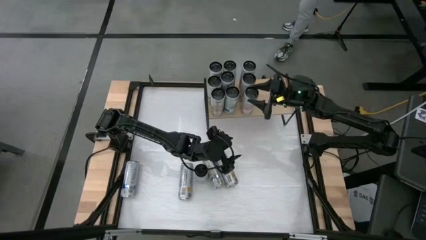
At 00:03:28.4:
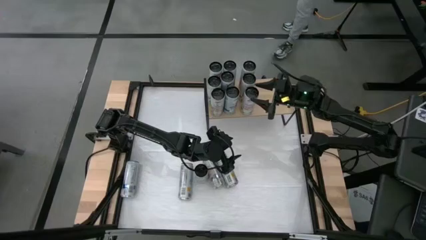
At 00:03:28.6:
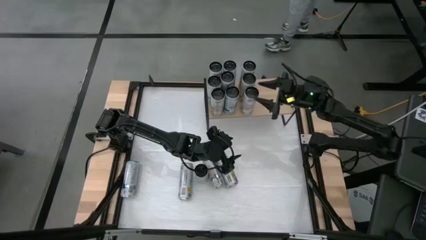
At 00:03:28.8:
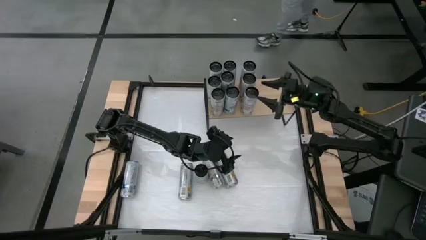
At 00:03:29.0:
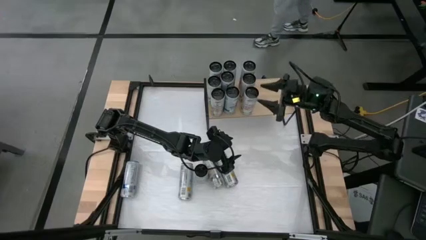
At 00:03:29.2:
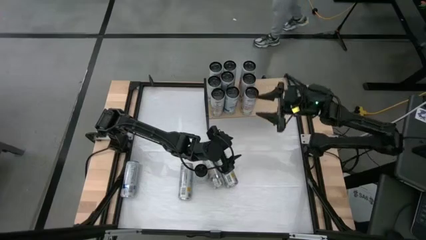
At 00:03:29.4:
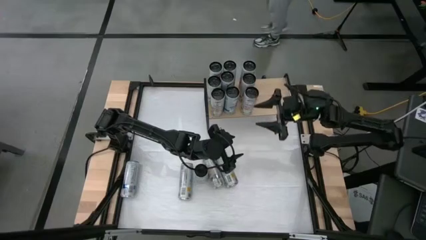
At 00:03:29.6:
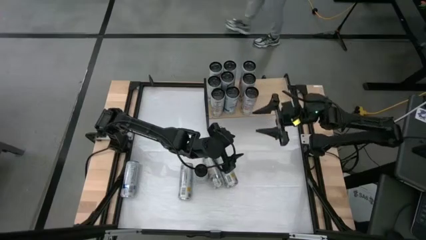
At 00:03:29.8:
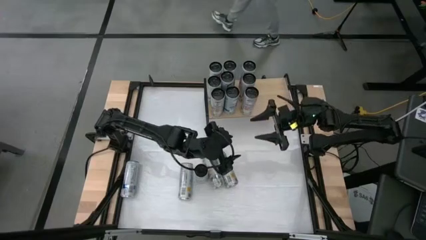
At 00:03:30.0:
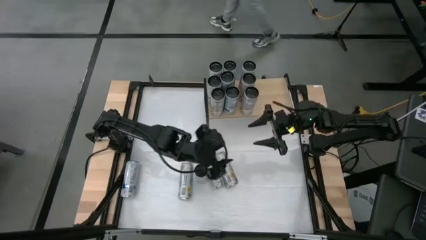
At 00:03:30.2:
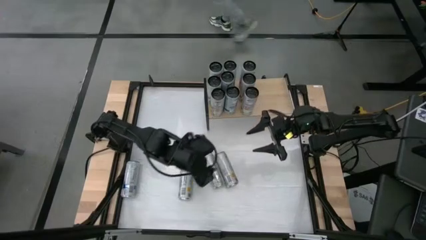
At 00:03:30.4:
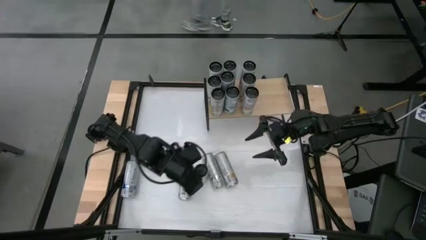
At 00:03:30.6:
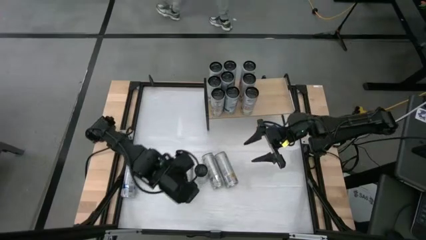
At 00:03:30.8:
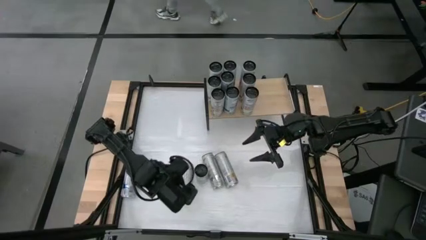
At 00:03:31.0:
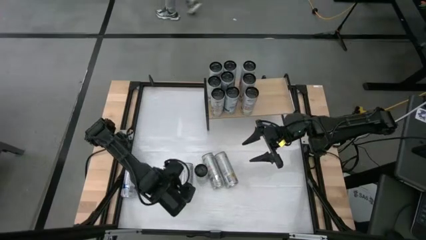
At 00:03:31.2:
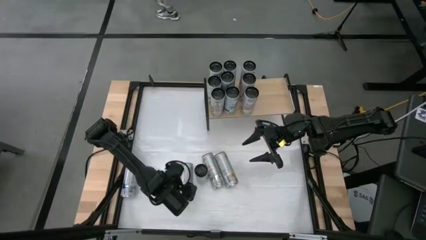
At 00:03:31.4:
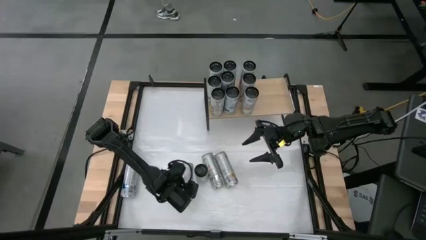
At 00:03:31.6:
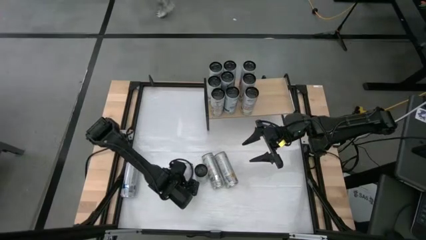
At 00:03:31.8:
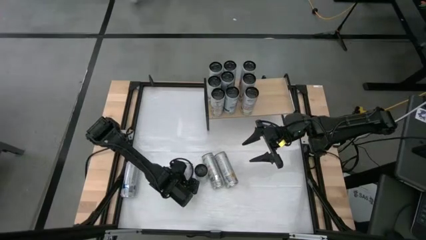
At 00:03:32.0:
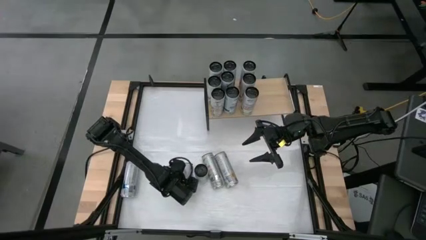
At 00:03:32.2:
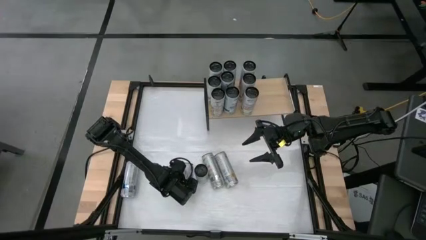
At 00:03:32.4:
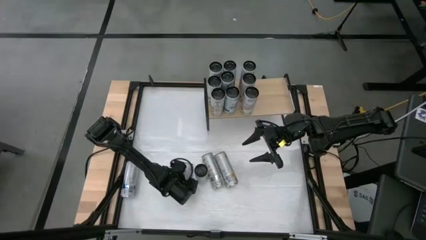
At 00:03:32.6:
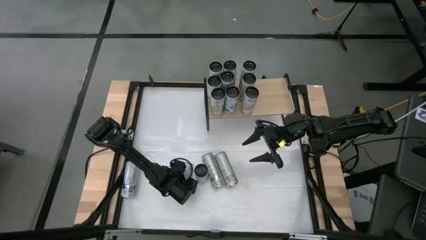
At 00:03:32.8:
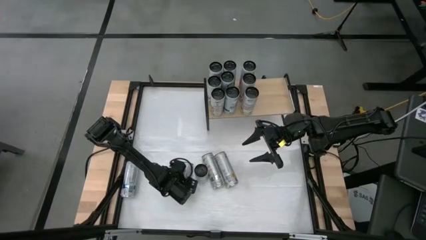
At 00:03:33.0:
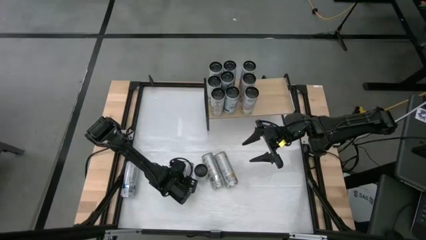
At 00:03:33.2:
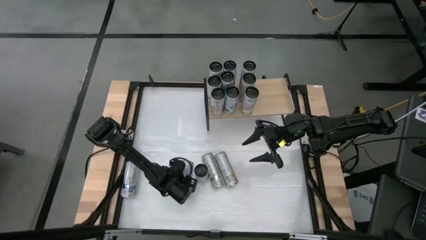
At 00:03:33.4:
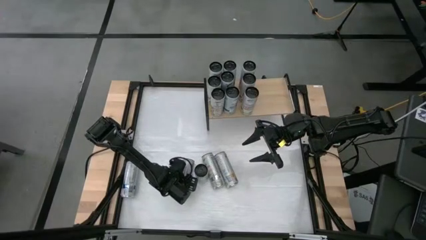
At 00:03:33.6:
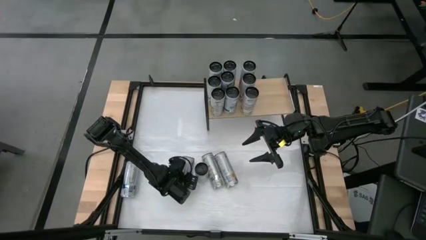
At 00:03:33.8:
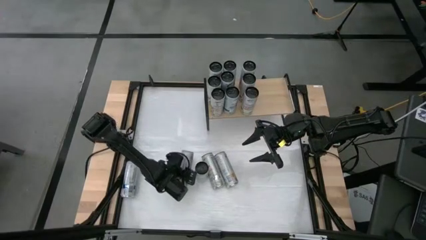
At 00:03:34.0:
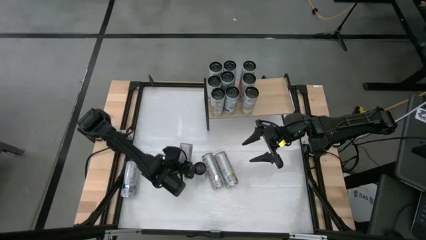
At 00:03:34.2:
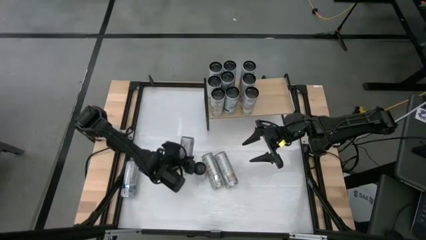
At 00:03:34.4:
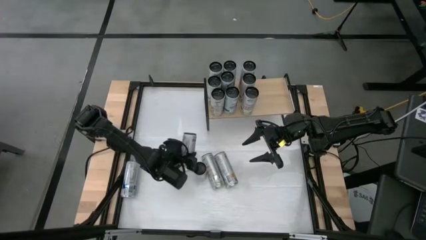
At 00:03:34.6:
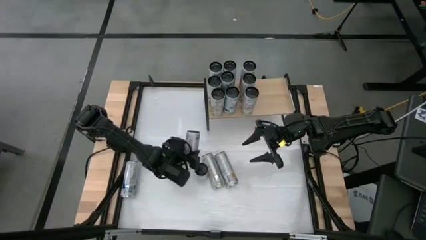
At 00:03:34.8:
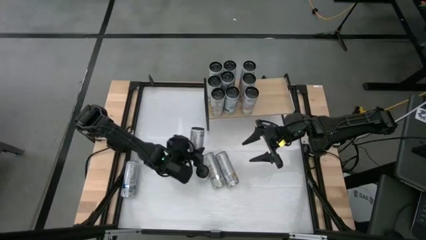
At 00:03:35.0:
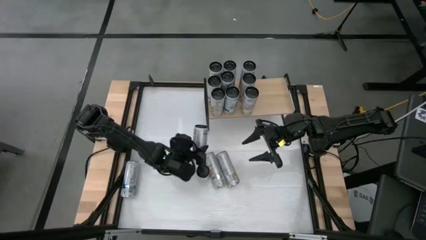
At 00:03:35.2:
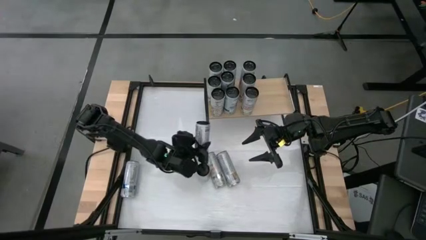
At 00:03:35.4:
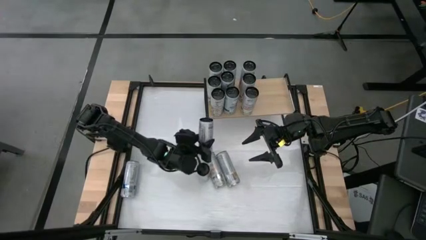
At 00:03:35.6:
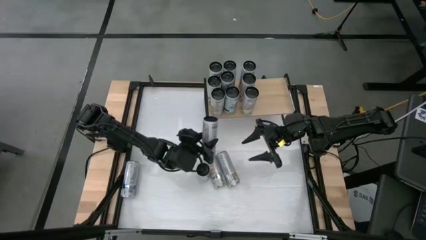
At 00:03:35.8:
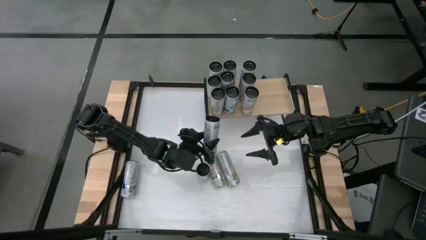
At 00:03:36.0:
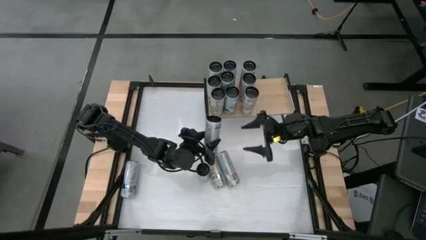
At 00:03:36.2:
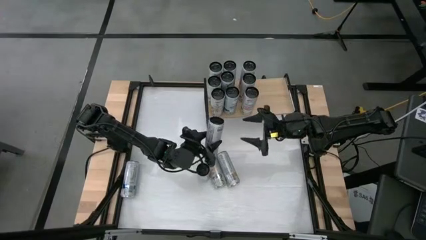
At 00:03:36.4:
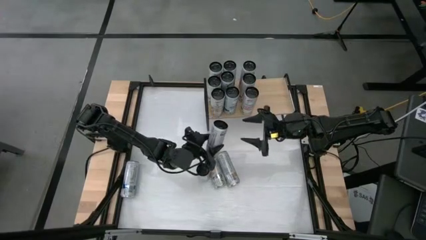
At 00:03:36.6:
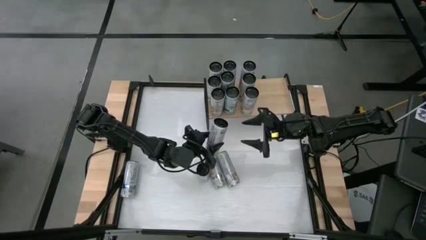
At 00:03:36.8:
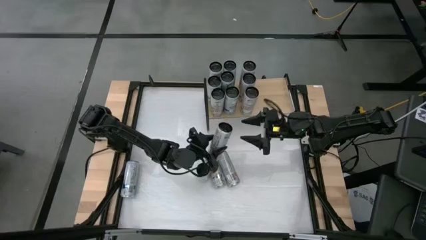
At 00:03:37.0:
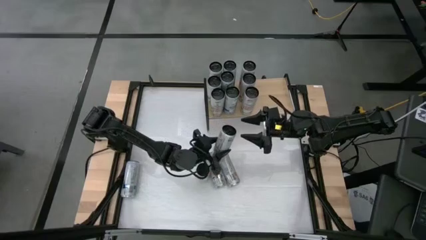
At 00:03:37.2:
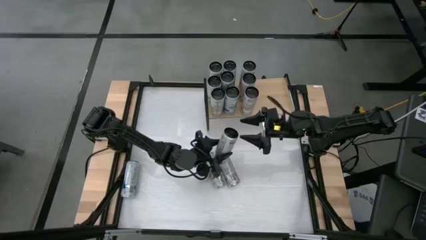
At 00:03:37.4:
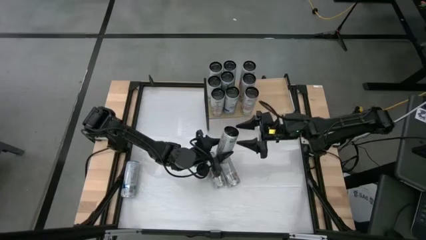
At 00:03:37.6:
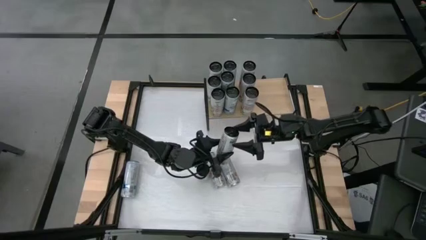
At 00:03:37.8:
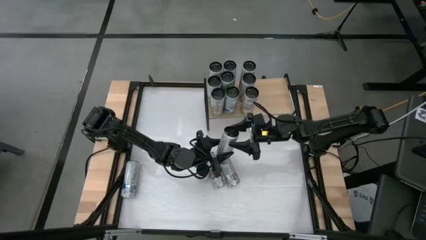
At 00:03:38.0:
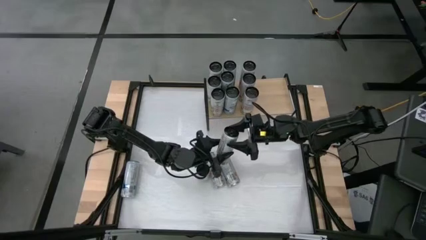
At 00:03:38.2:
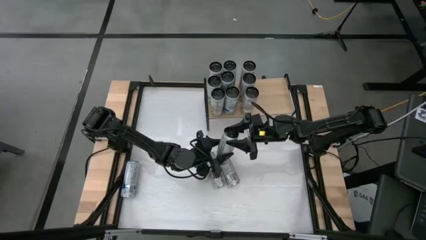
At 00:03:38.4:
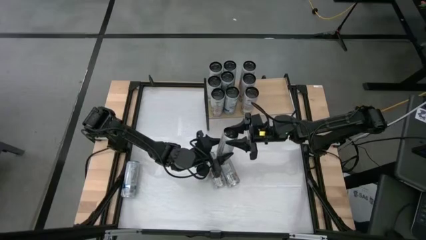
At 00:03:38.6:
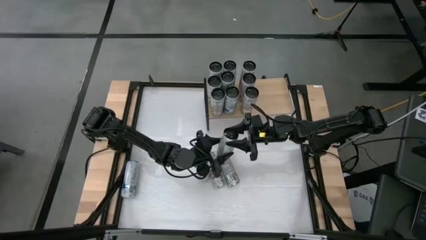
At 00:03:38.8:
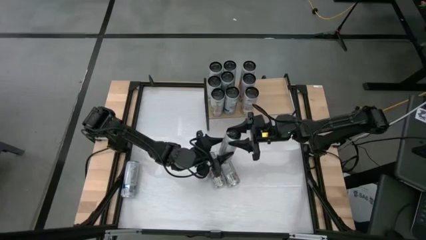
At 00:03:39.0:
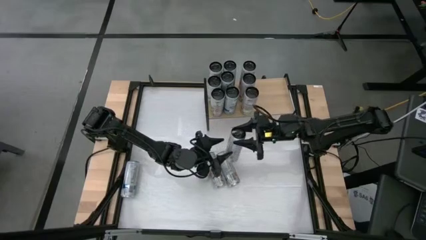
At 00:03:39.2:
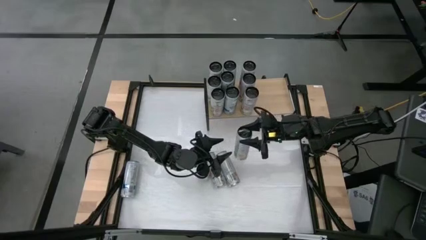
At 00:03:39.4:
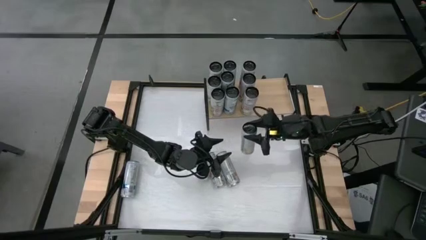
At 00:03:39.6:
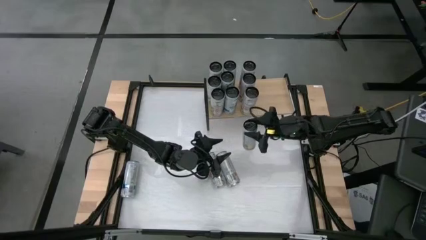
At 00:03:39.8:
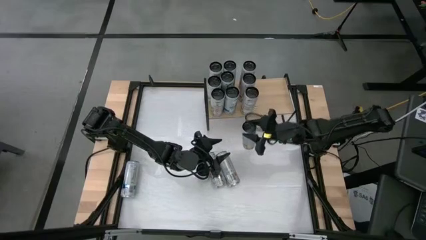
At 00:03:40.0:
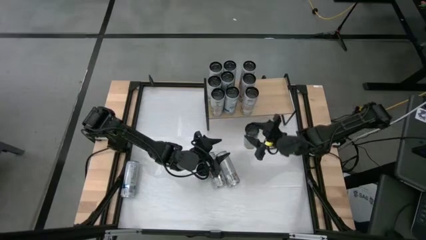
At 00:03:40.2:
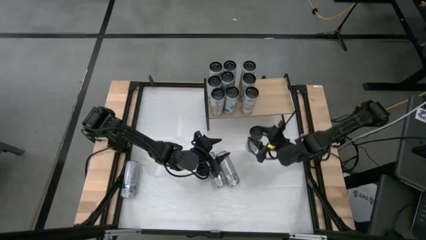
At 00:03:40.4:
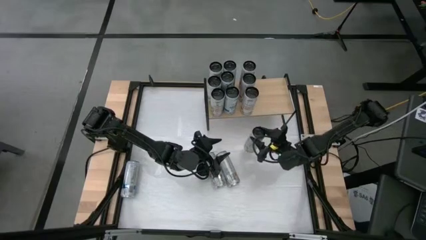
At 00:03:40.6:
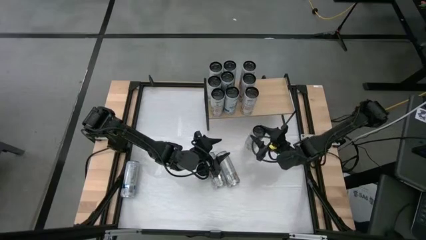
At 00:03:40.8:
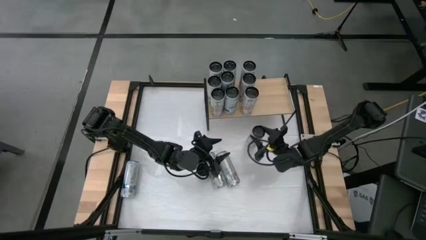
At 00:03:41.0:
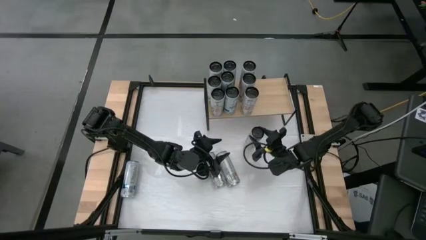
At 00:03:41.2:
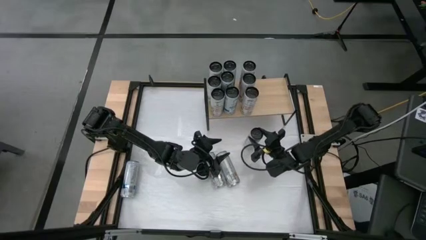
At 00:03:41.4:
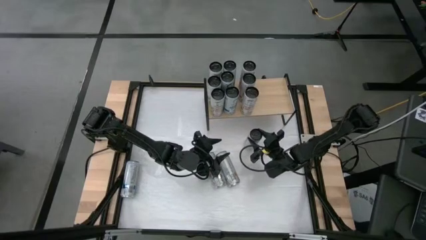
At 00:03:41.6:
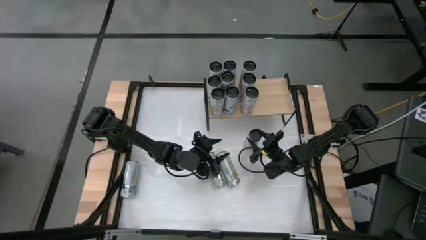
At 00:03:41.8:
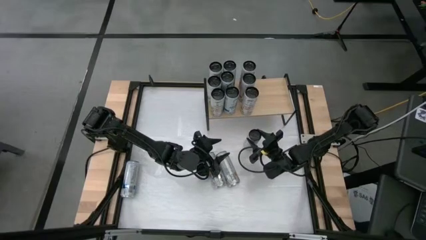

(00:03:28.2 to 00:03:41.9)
Task: Place canned beverage on shelf
Put the orange soda can on the shelf
